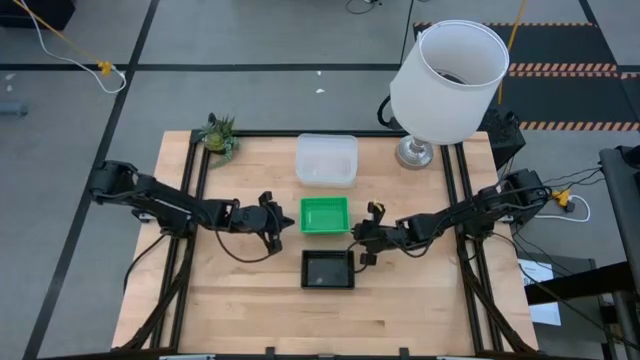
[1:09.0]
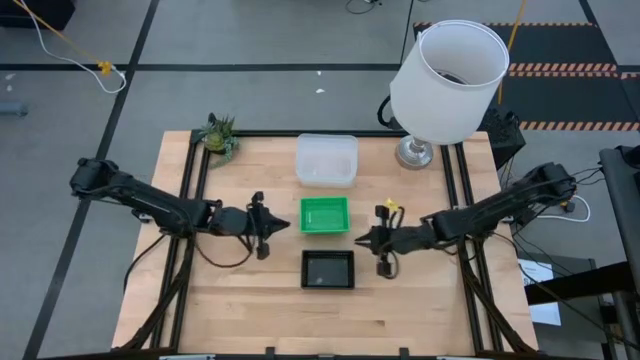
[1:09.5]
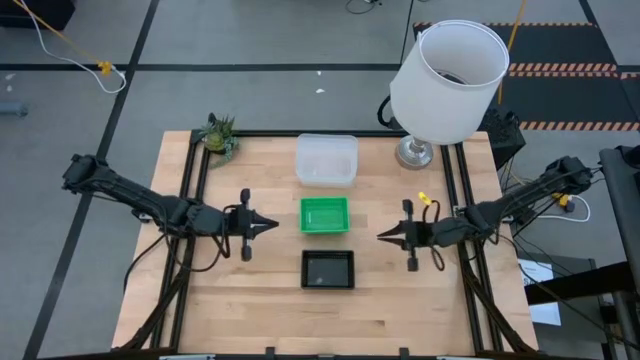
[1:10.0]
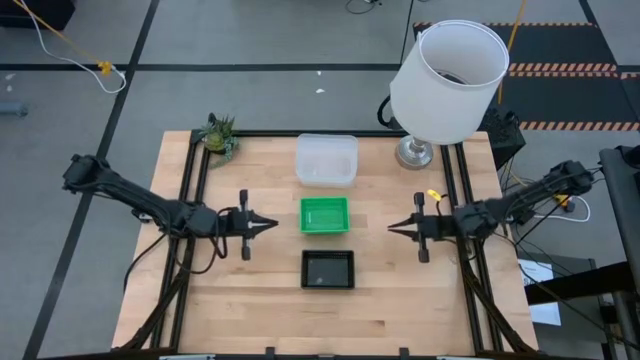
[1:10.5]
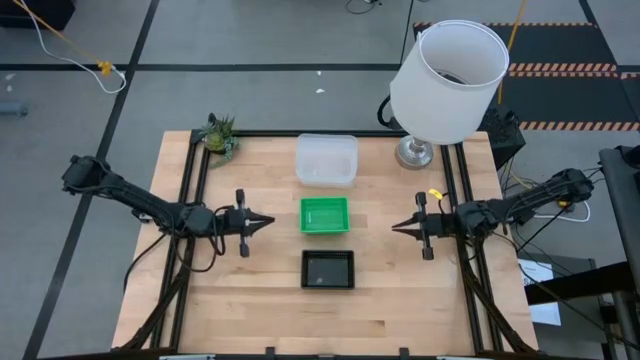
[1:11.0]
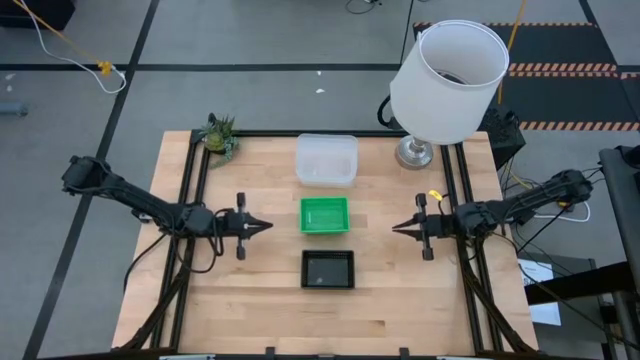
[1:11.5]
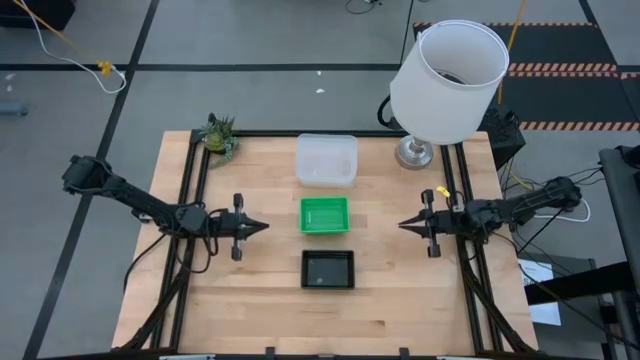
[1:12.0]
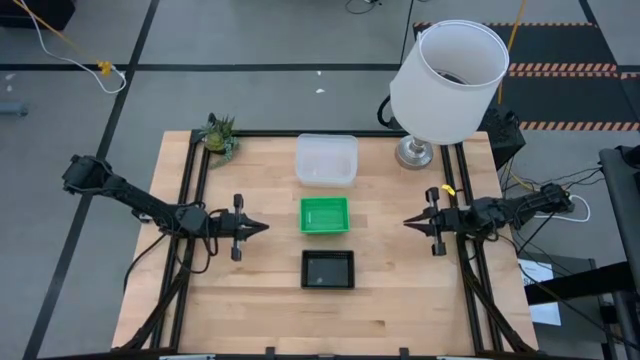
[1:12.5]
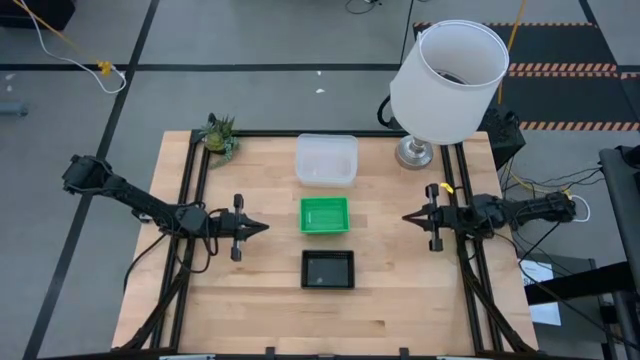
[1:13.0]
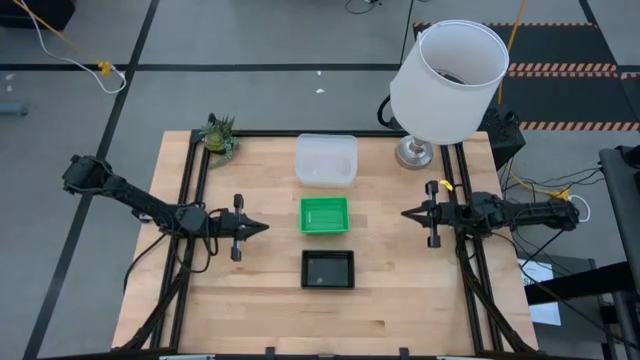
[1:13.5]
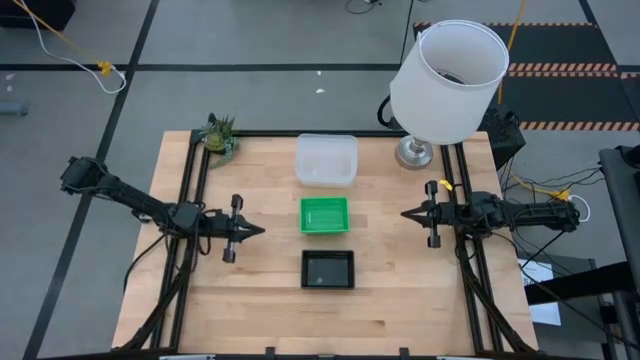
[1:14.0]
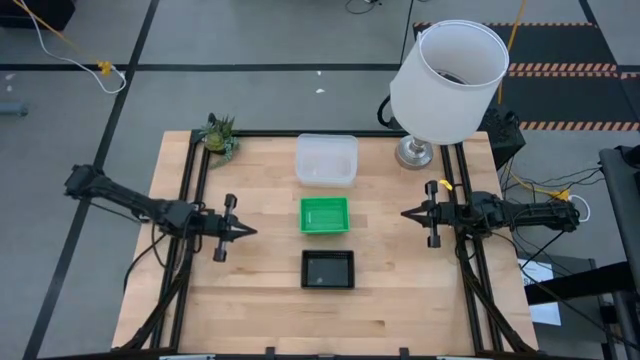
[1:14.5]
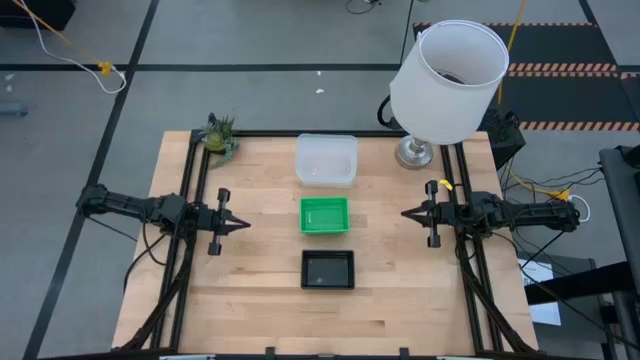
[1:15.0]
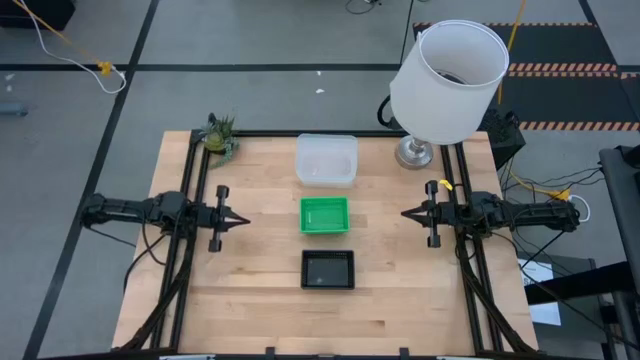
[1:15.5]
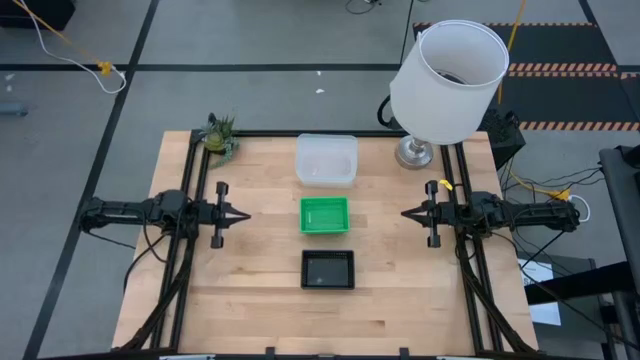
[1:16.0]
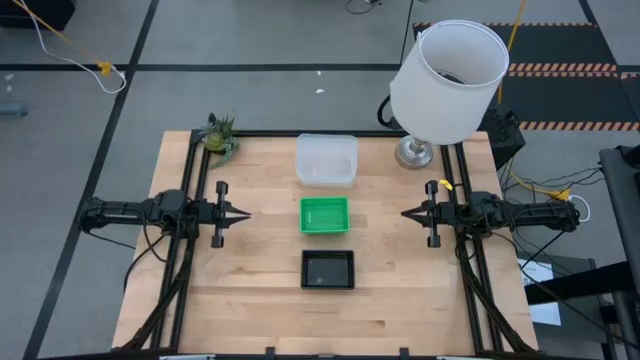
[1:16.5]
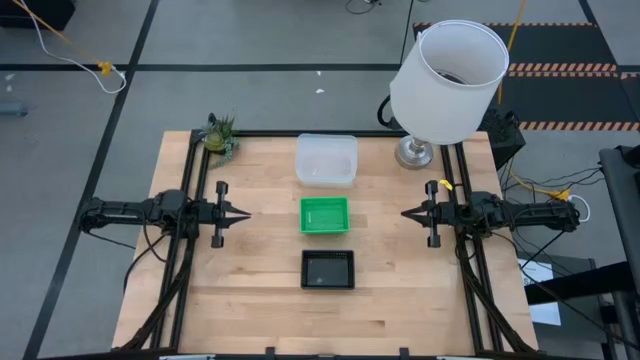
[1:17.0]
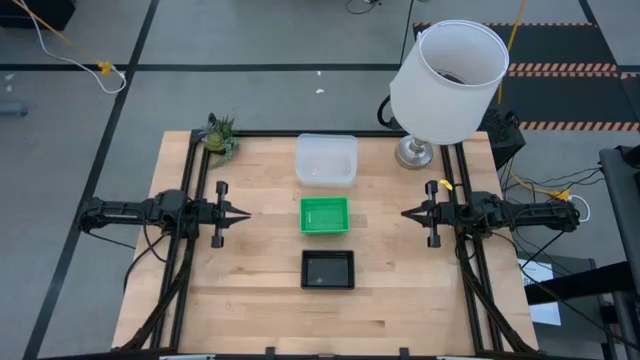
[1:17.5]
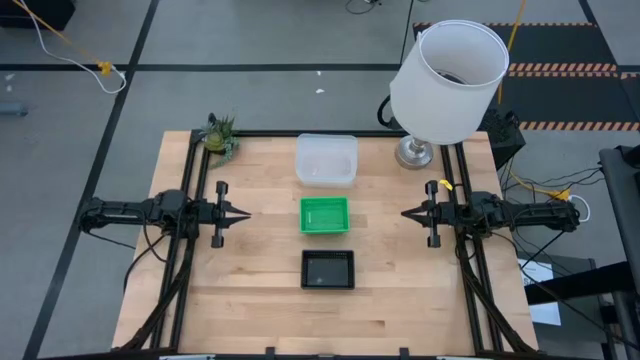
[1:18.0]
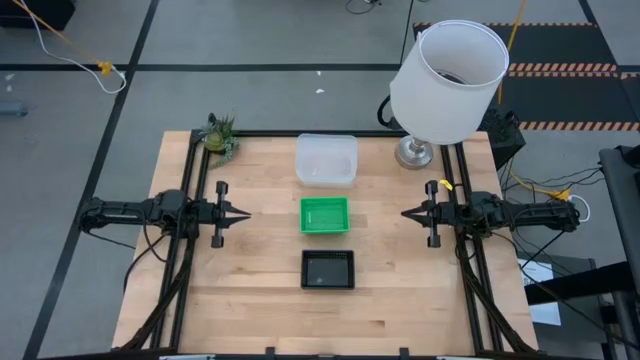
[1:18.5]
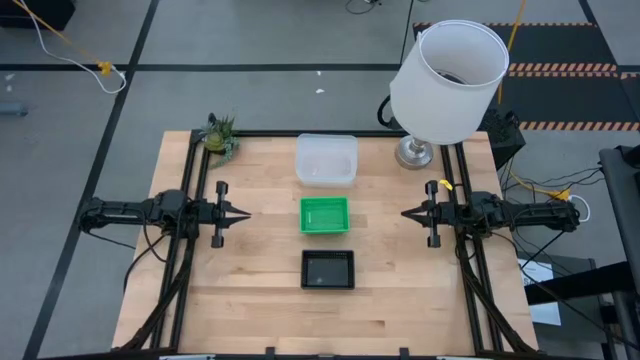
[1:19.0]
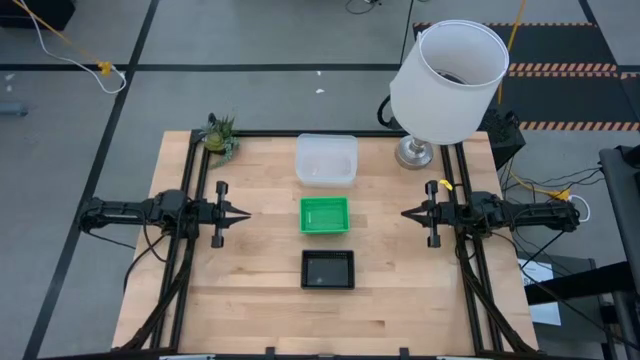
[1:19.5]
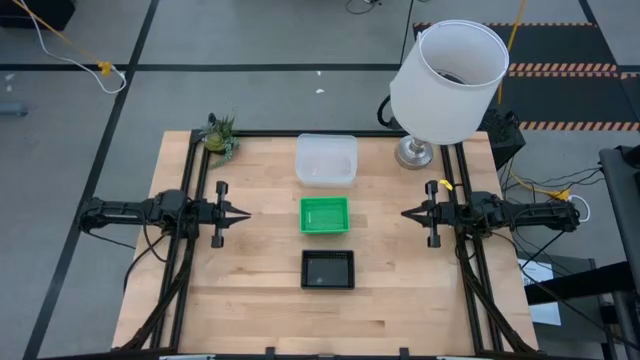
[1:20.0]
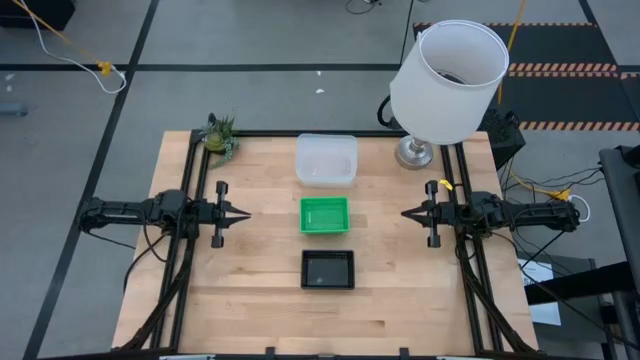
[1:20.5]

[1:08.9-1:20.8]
Return to Home Position

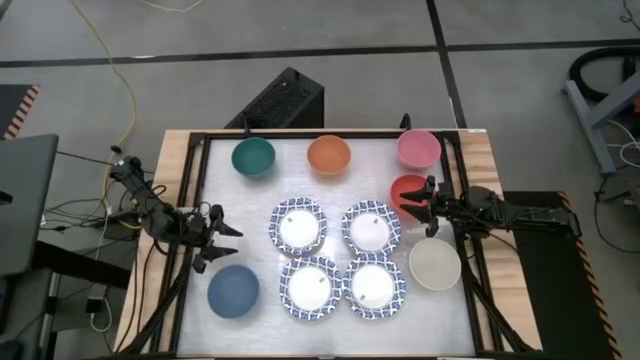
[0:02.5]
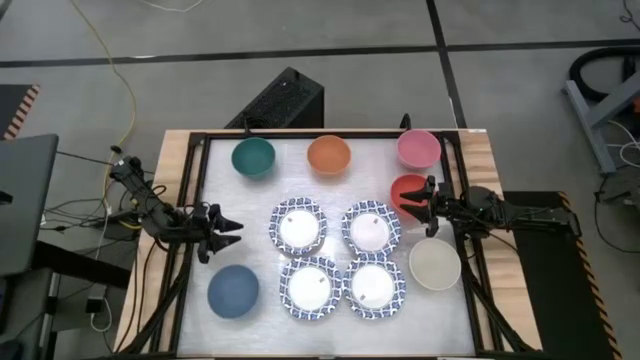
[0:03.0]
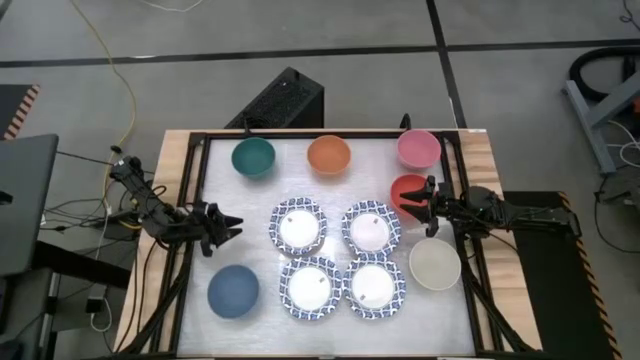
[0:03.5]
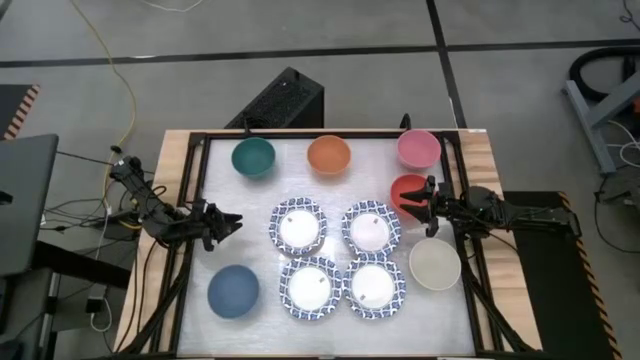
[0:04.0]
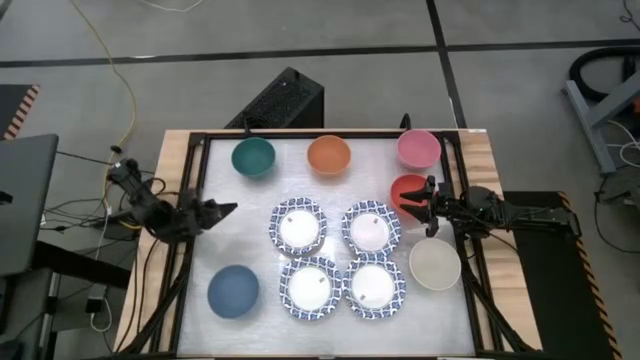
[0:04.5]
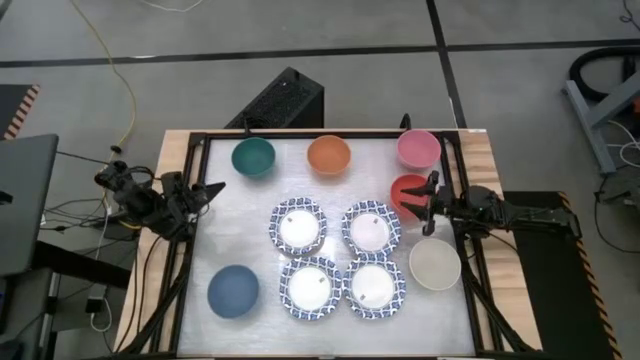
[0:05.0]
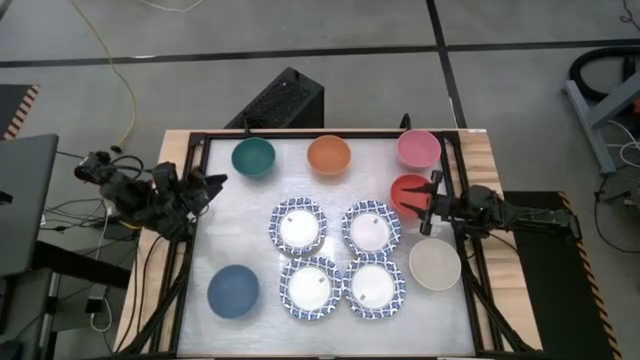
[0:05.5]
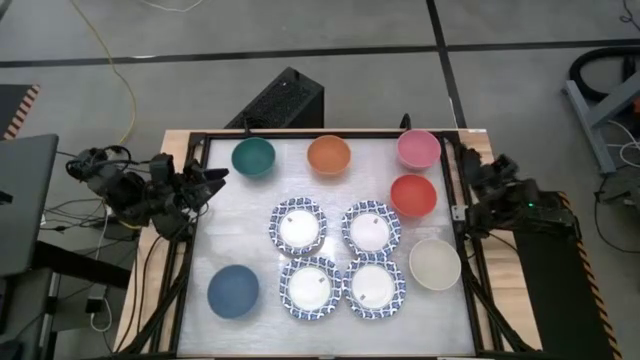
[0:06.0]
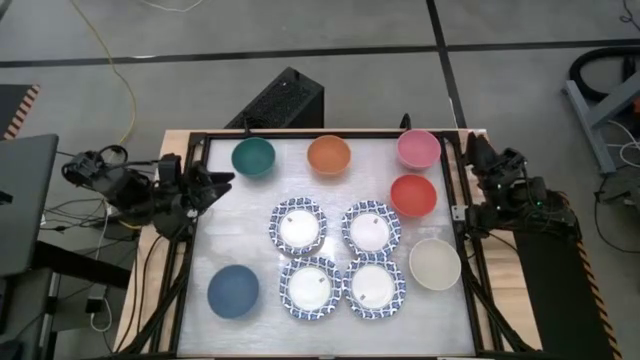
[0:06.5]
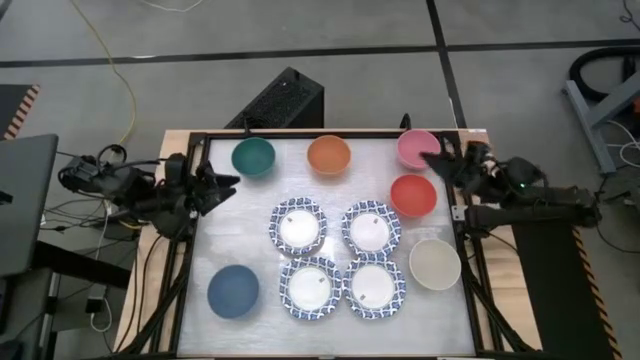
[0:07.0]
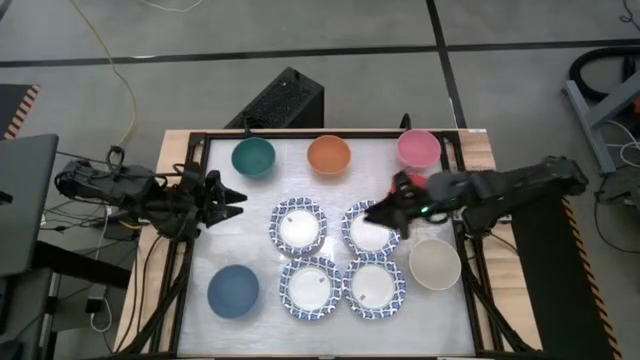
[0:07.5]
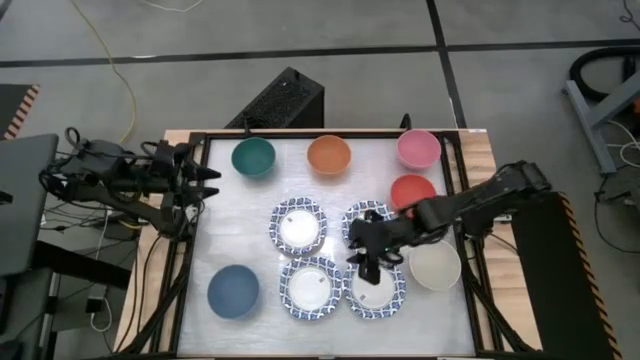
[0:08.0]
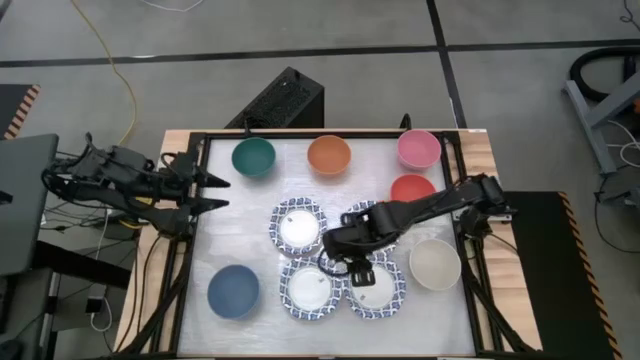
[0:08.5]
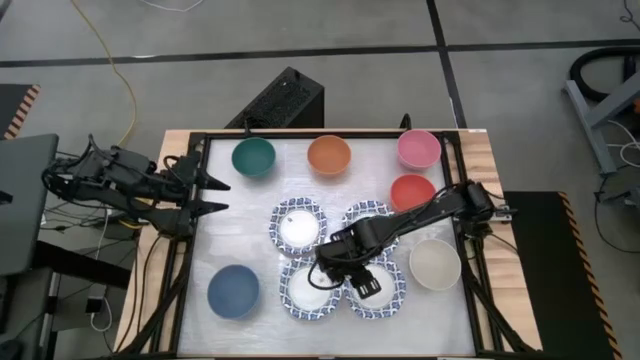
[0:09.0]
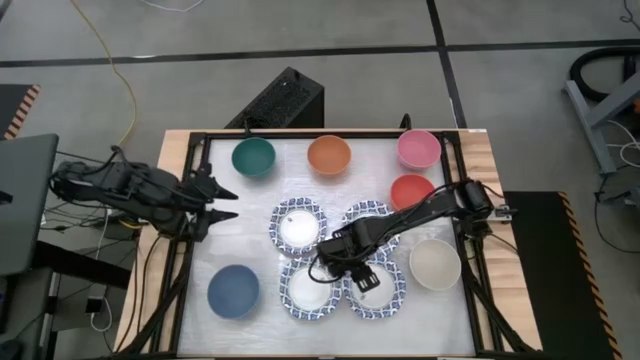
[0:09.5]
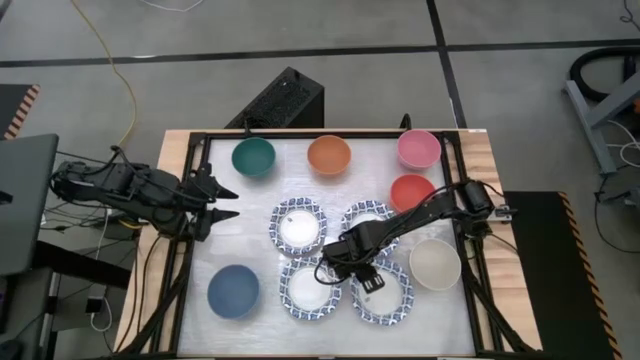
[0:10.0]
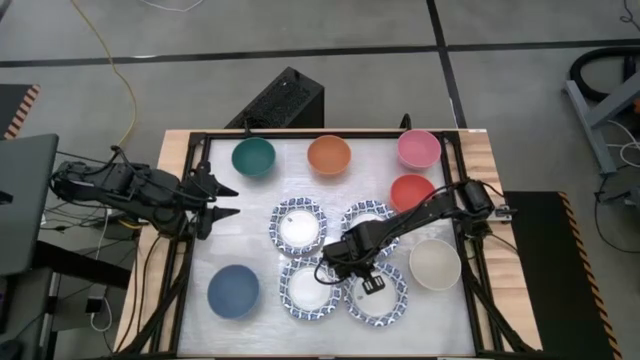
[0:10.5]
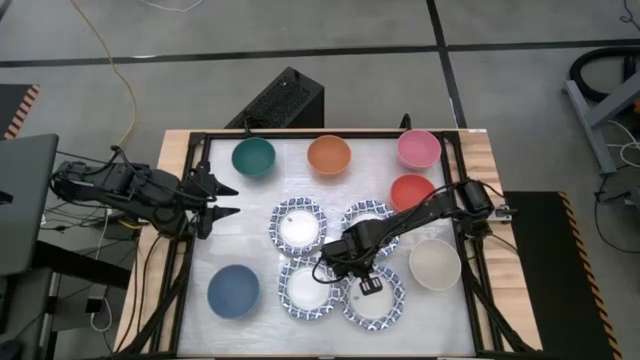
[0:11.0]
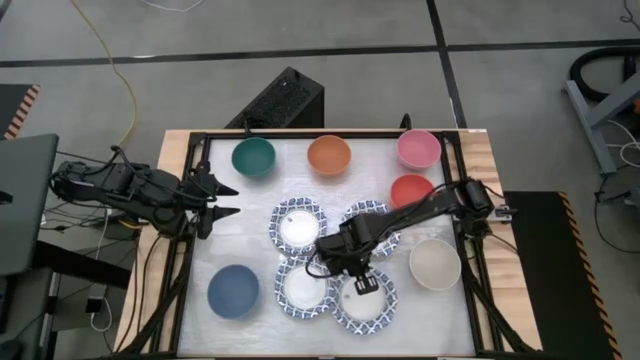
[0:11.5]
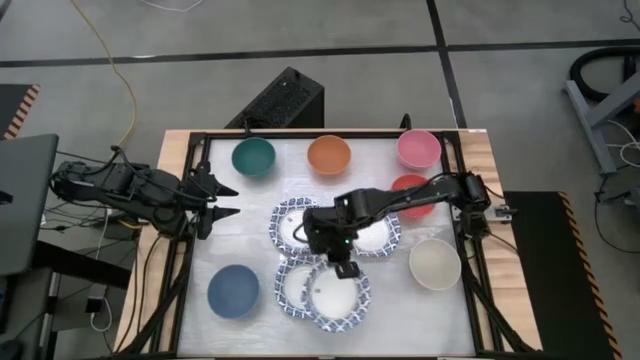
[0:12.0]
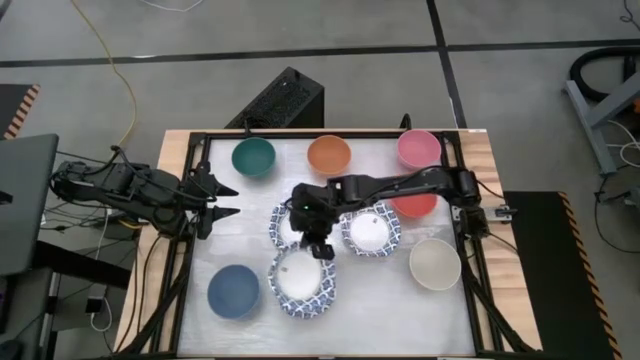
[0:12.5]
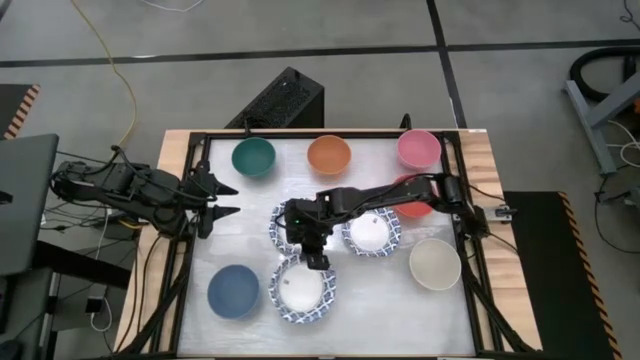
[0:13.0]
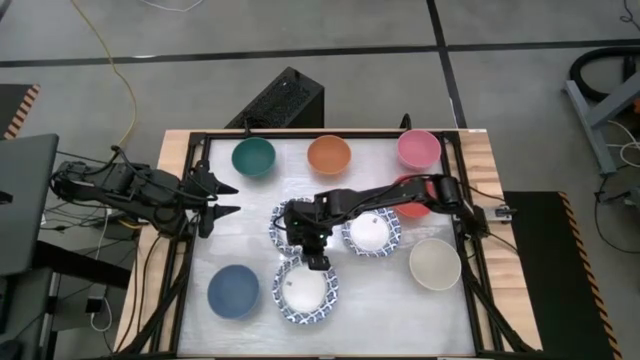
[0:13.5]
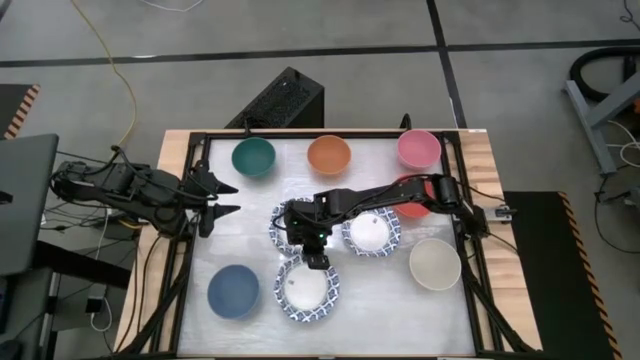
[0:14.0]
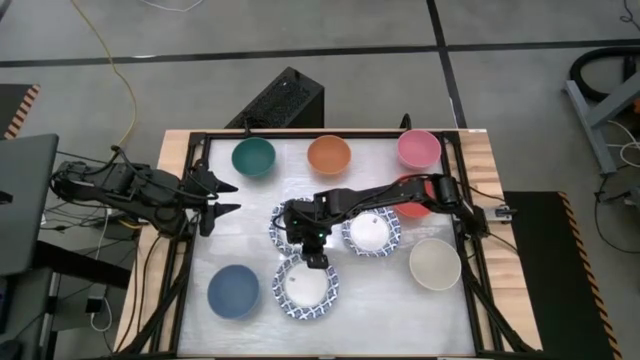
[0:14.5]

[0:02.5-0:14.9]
Stack the blue patterned bowl on top of the blue patterned bowl
